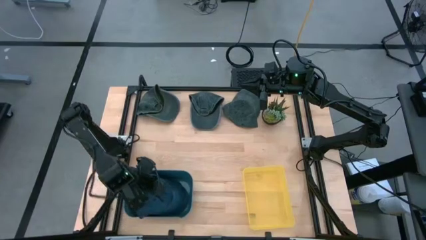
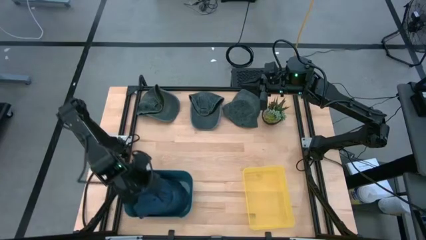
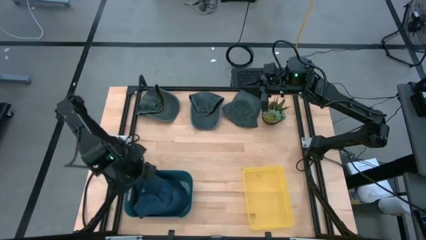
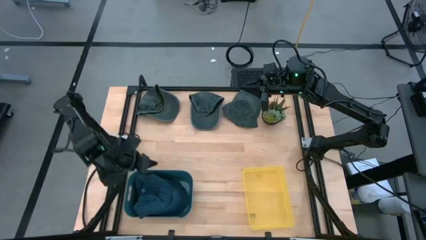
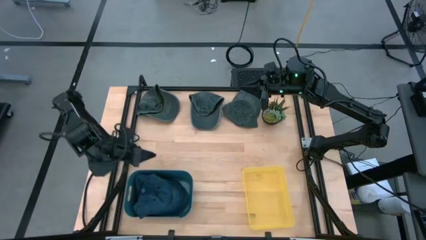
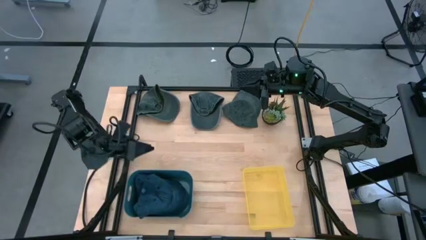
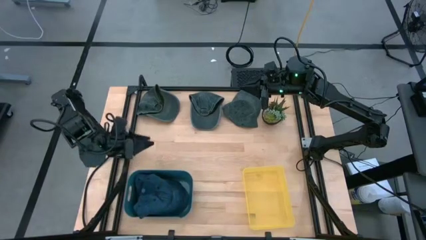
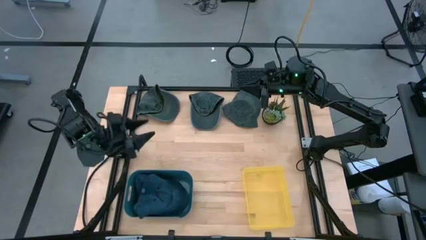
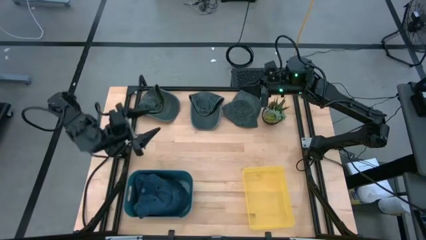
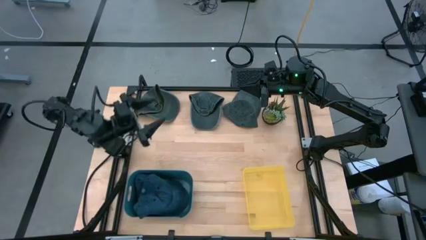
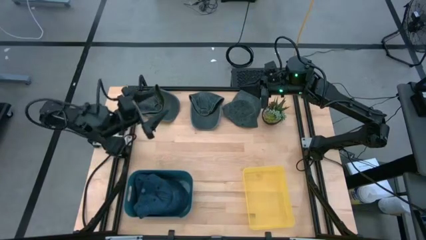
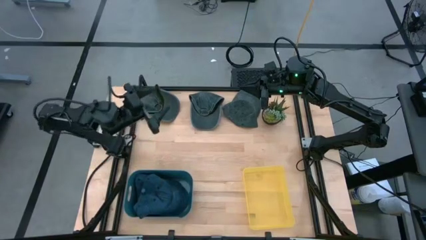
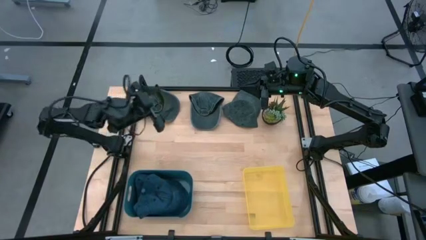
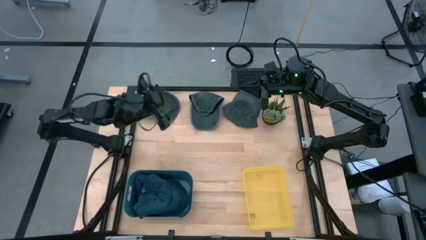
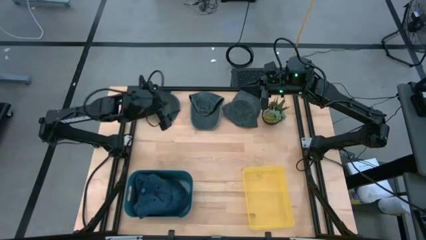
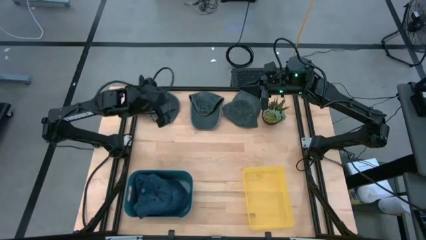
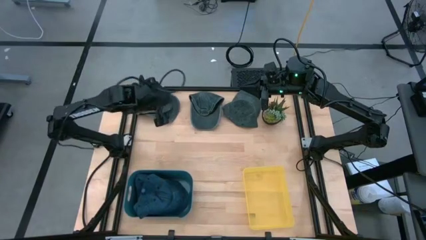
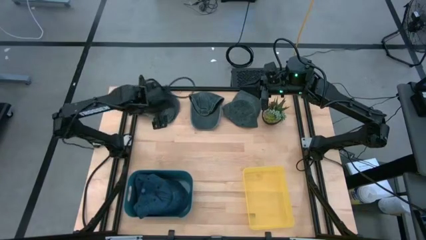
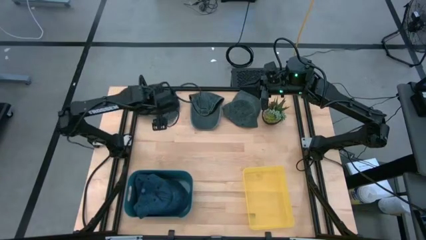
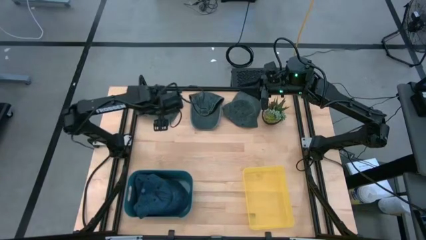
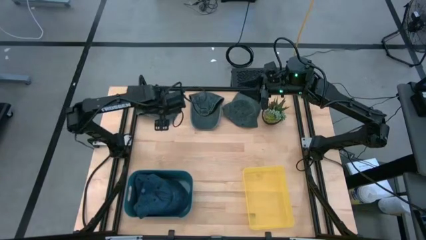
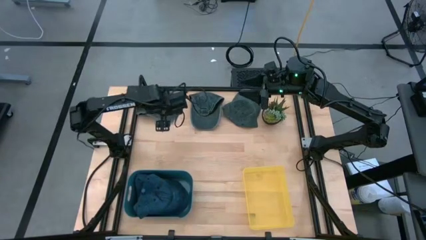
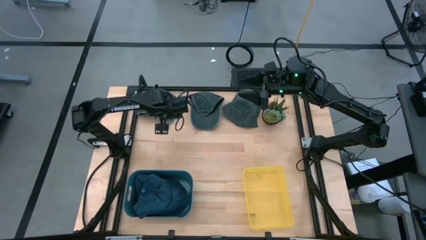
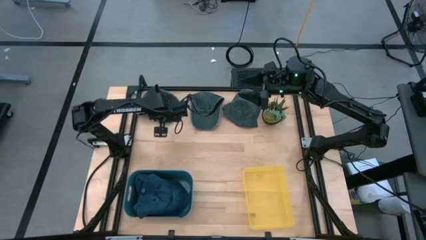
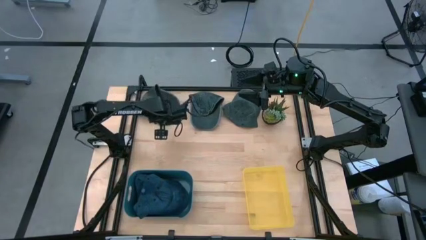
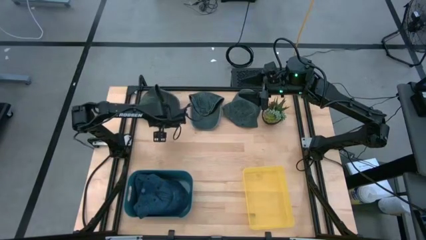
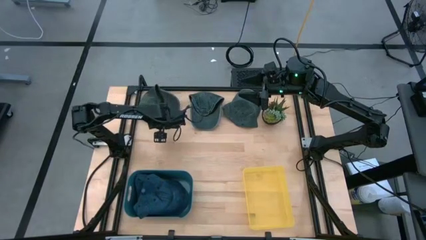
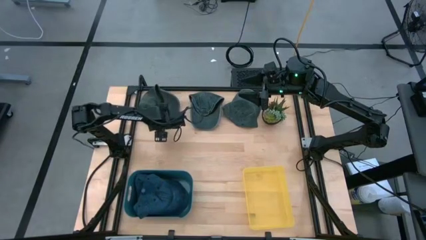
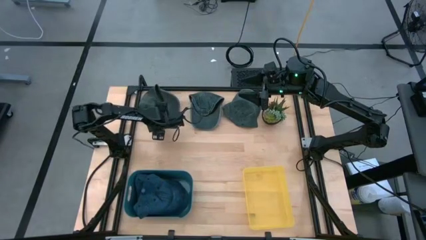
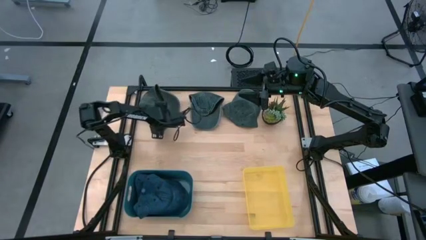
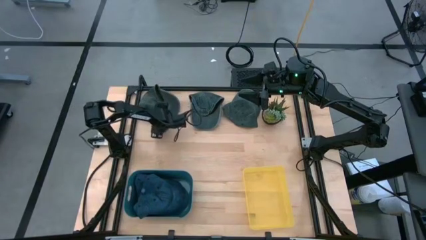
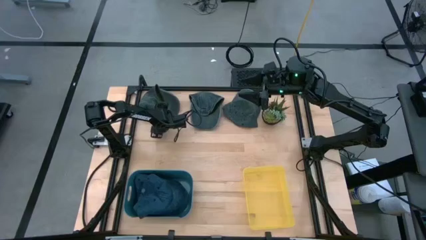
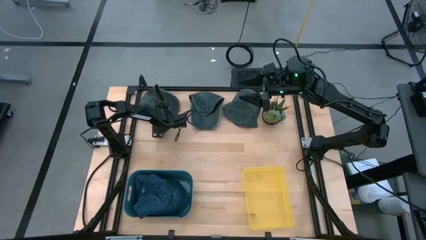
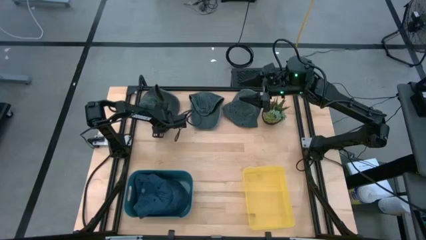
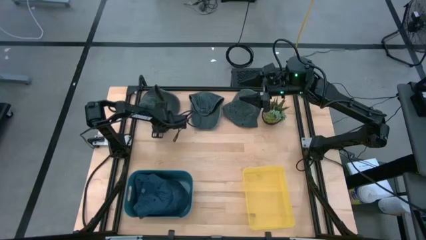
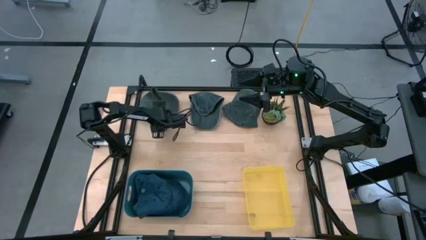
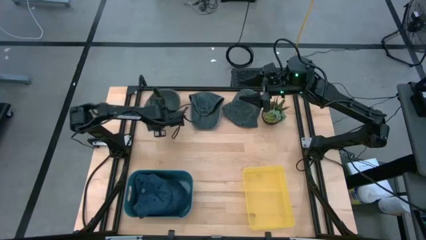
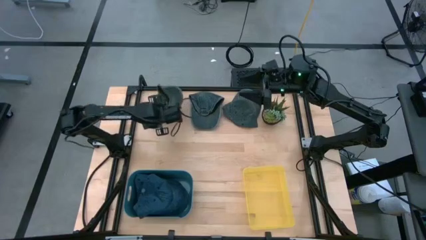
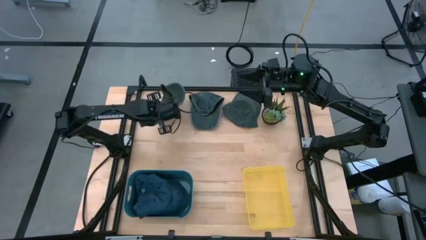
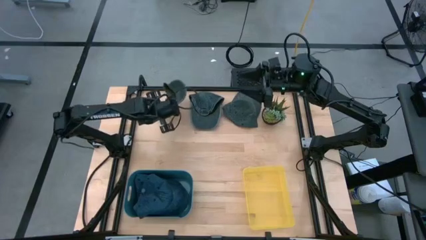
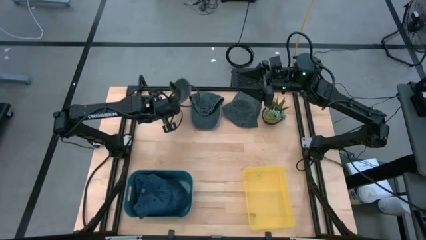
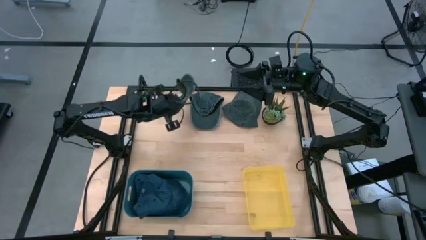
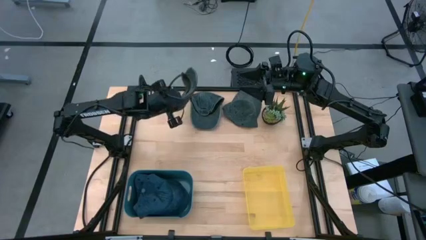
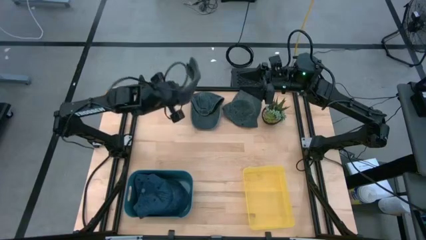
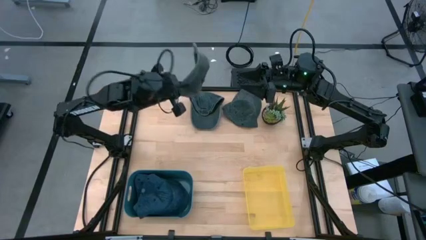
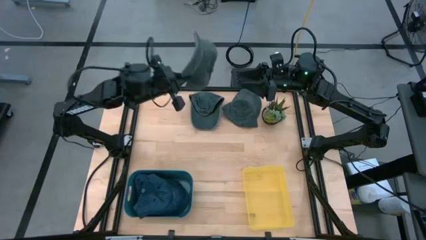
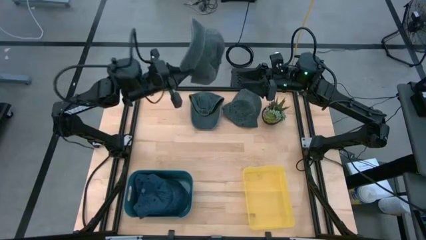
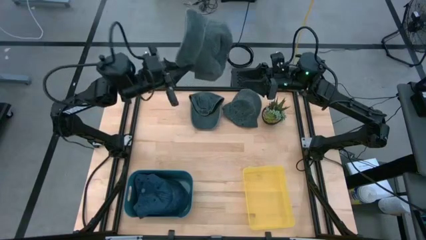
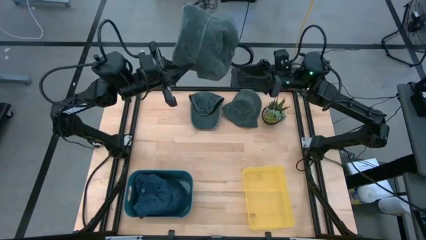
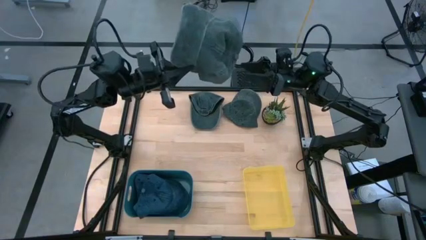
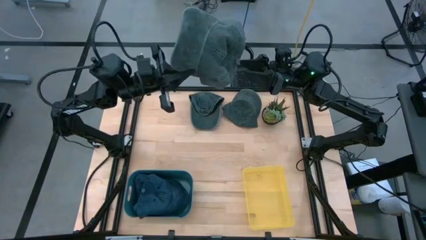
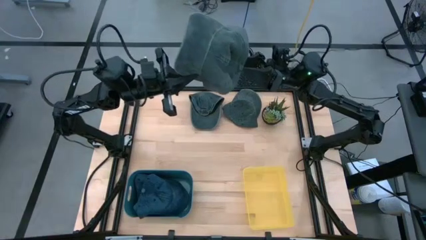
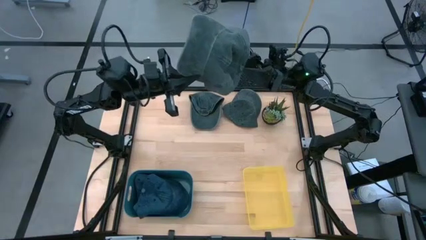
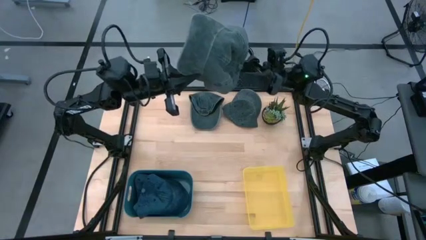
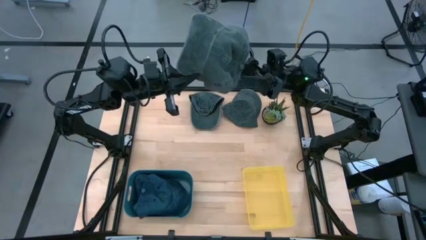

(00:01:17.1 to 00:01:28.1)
Task: Pick & Place hat
Put the left gray cap into the yellow bin

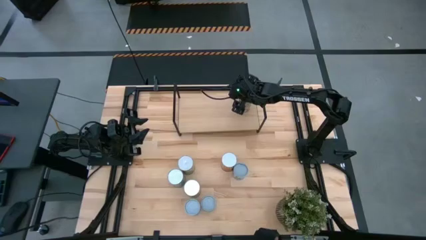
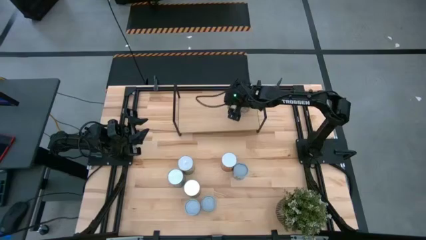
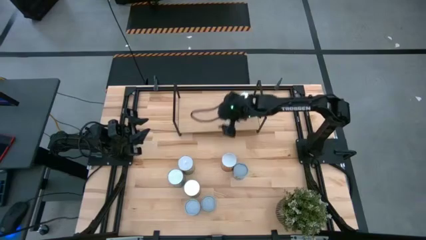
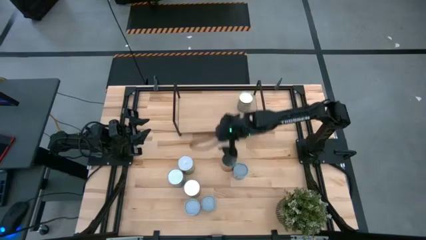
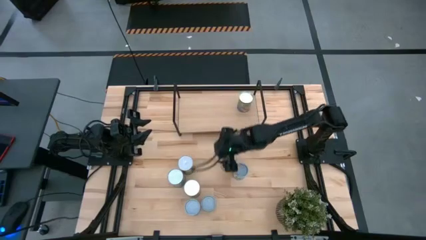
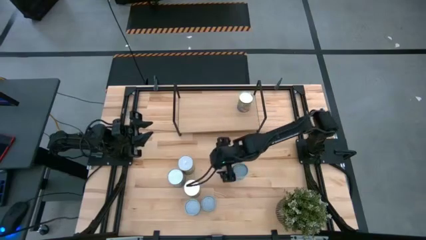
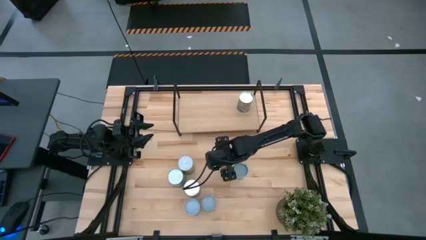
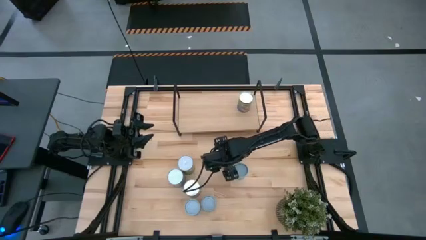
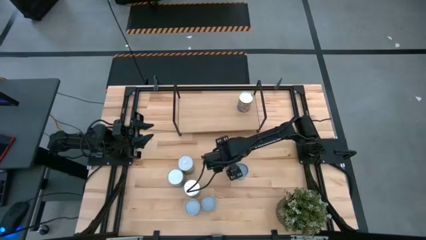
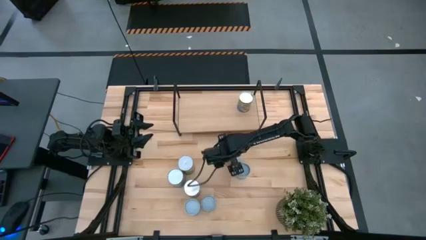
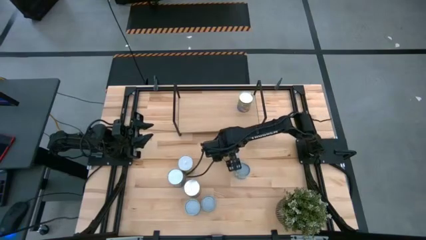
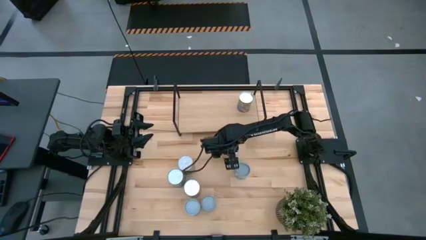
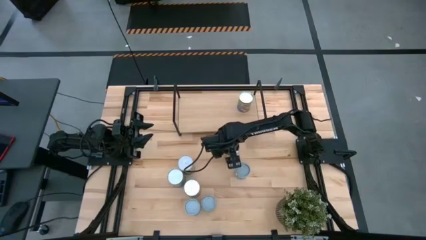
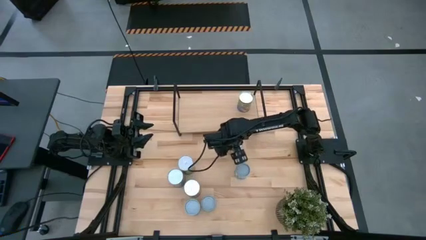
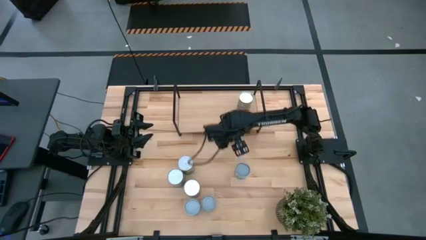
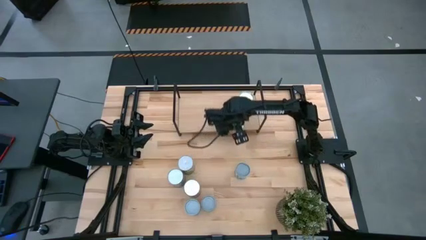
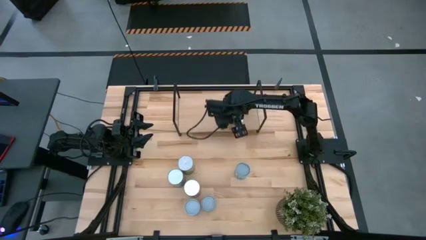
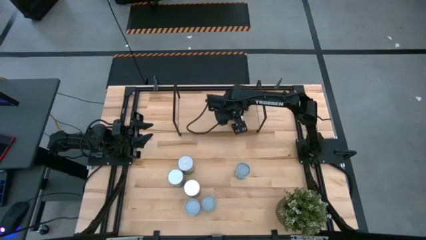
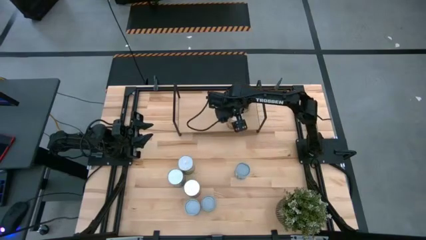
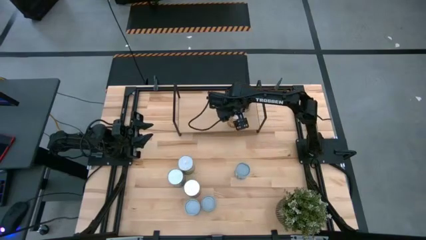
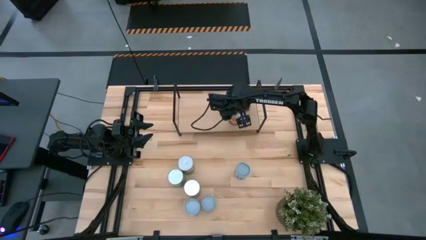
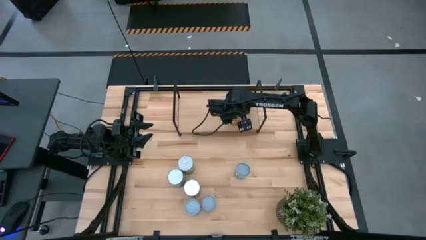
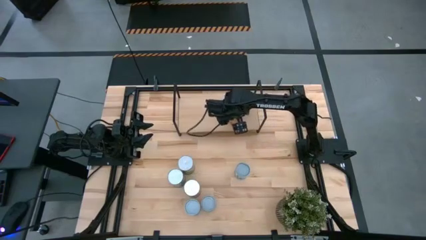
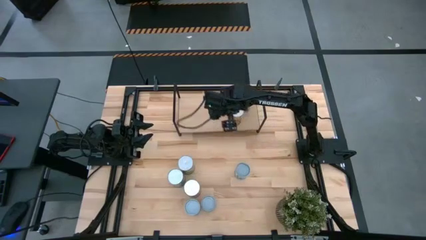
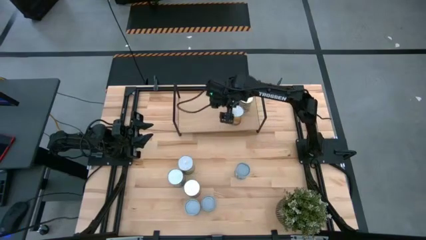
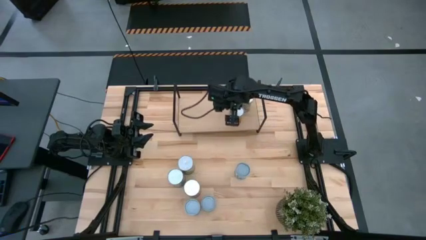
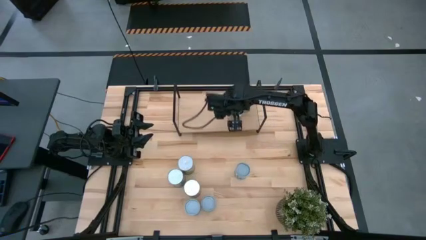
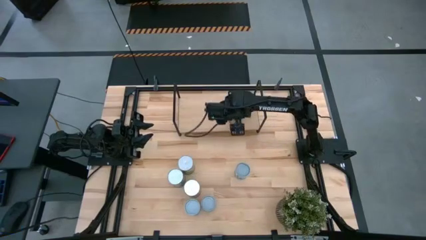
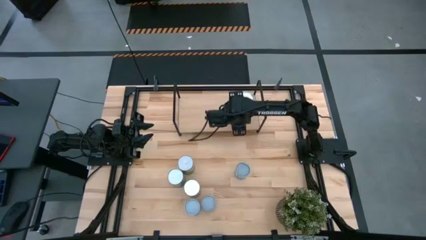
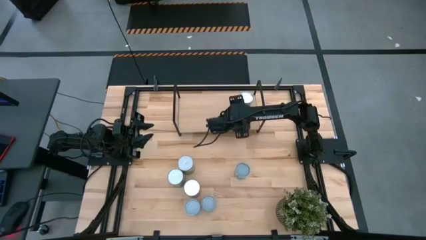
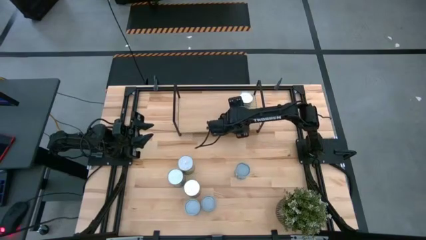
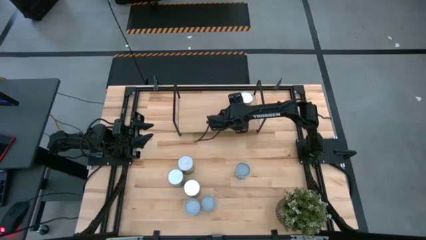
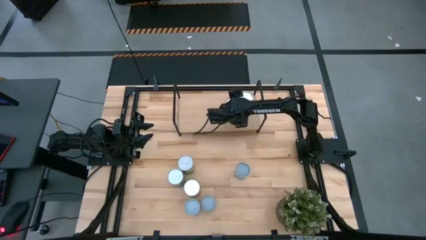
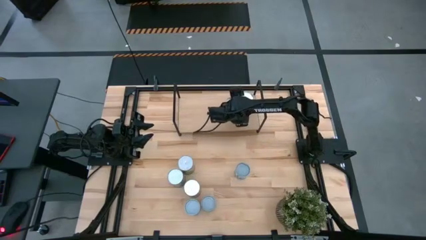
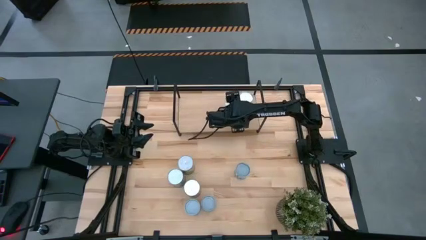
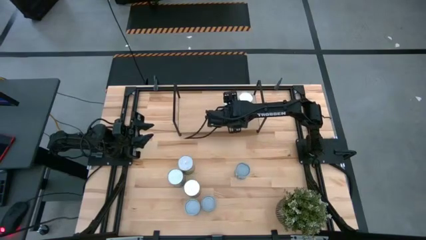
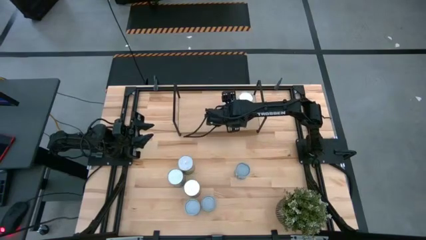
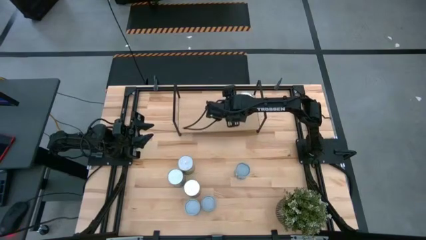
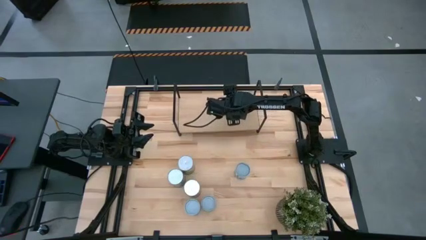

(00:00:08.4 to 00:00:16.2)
Task: Pick and place cans onto a shelf
Put the canned corn on the shelf
